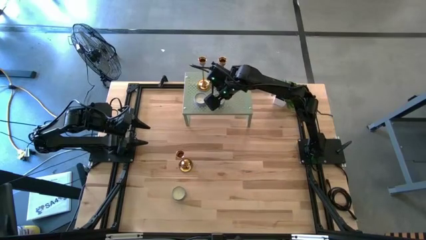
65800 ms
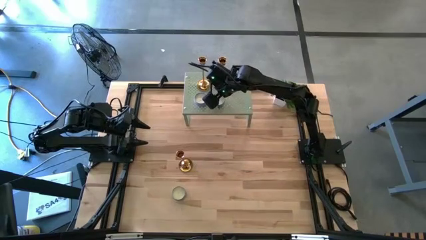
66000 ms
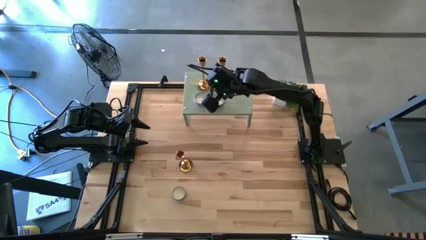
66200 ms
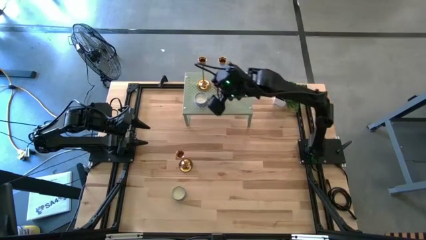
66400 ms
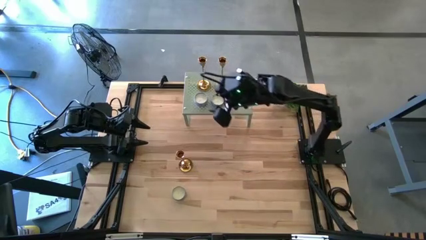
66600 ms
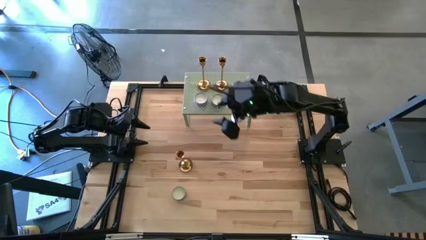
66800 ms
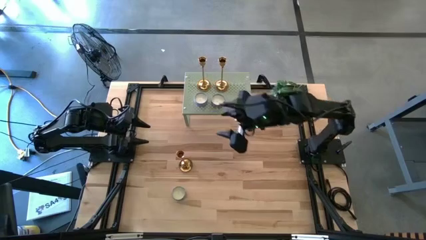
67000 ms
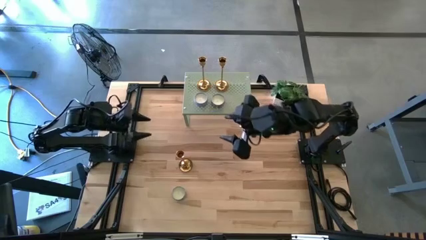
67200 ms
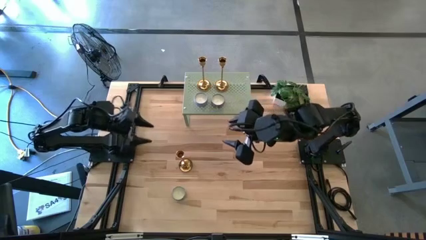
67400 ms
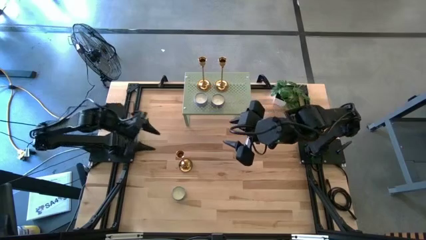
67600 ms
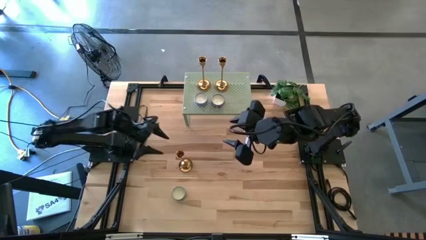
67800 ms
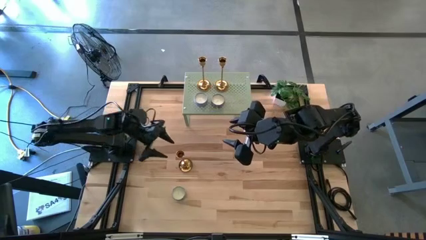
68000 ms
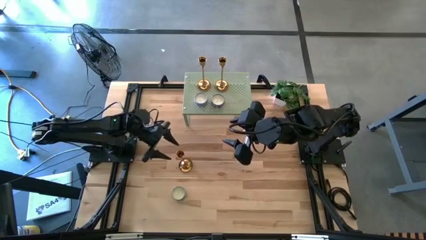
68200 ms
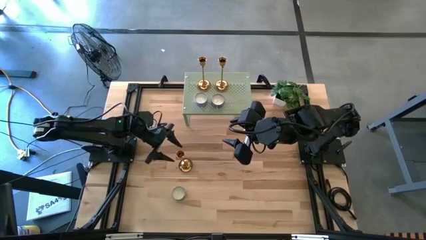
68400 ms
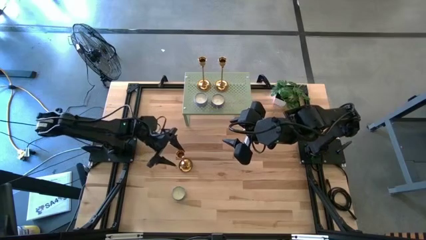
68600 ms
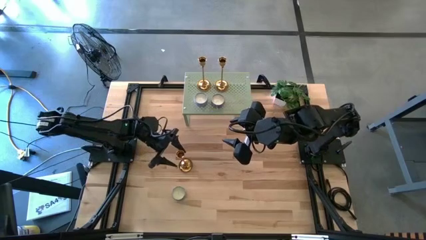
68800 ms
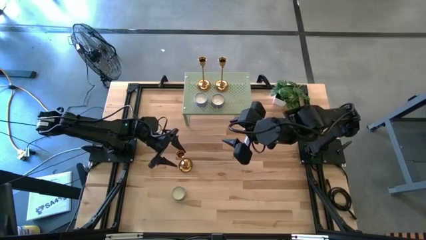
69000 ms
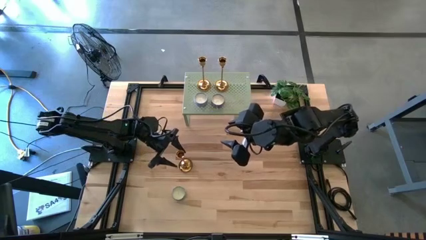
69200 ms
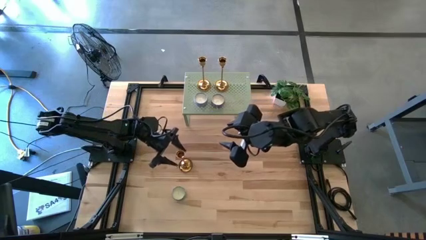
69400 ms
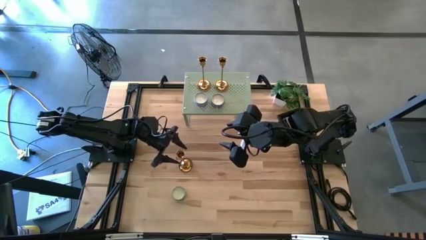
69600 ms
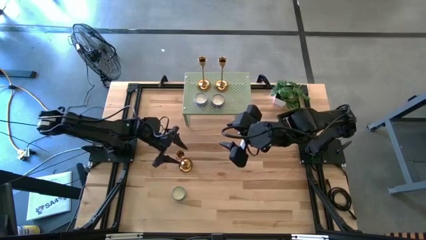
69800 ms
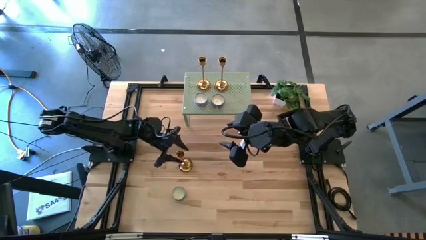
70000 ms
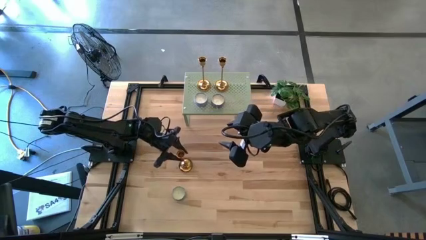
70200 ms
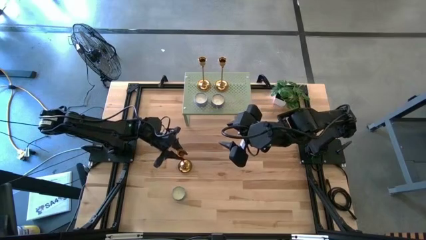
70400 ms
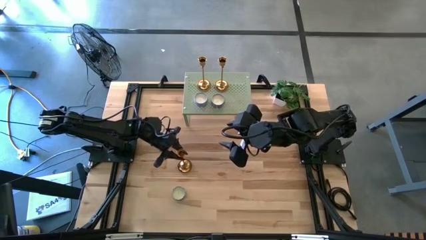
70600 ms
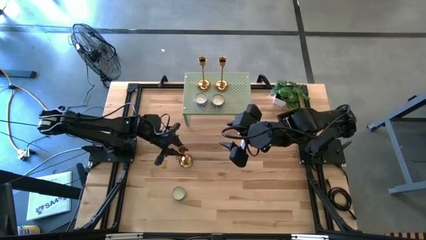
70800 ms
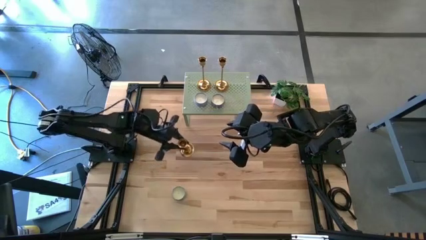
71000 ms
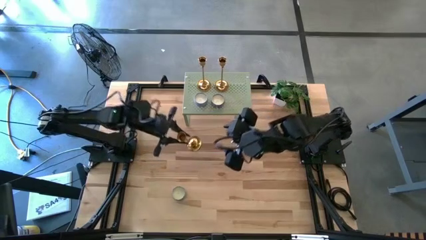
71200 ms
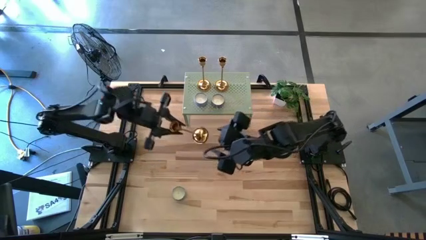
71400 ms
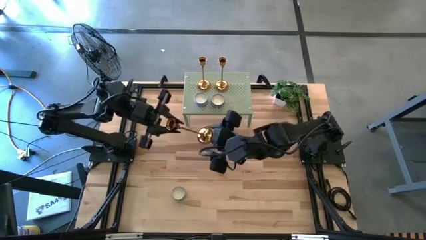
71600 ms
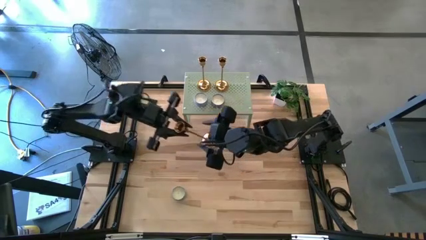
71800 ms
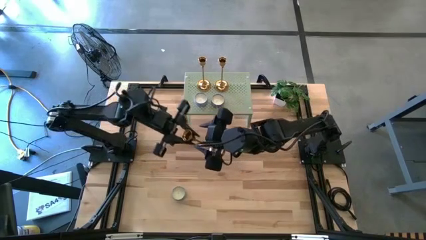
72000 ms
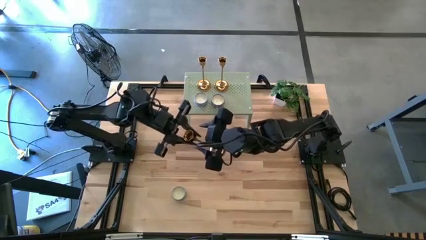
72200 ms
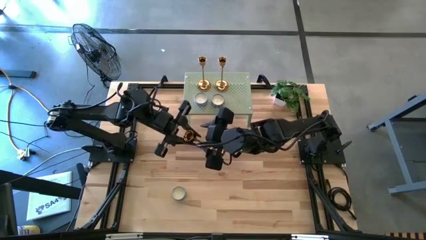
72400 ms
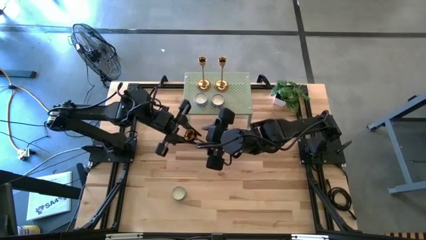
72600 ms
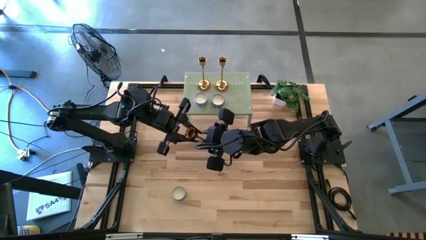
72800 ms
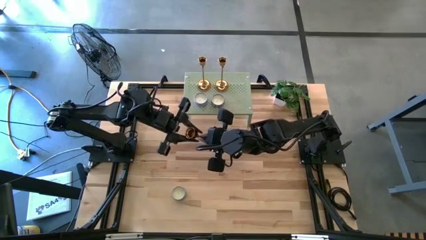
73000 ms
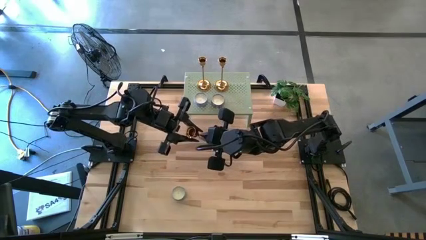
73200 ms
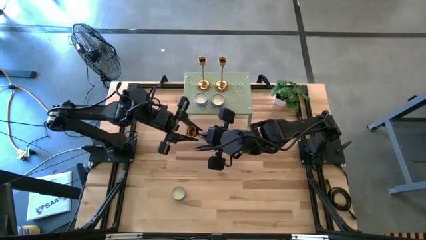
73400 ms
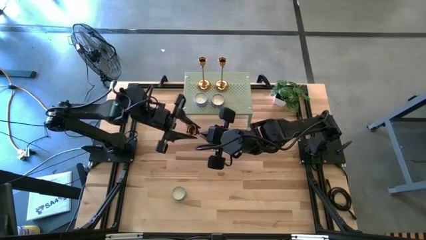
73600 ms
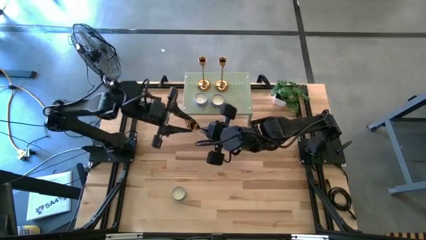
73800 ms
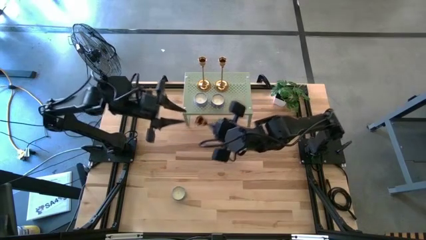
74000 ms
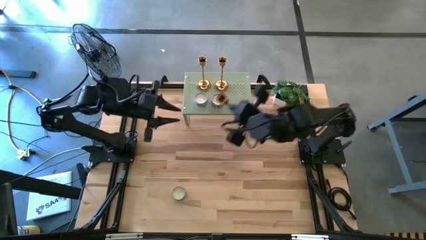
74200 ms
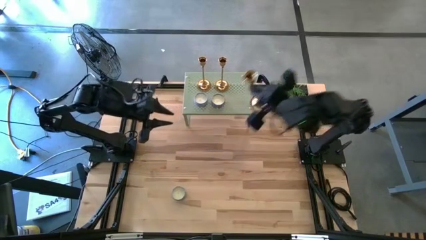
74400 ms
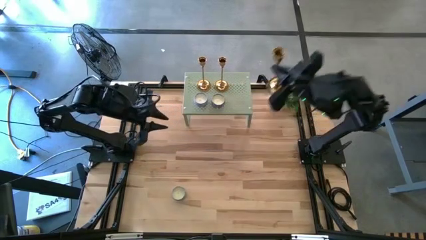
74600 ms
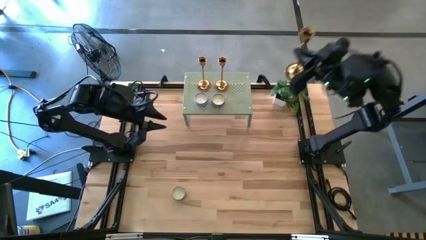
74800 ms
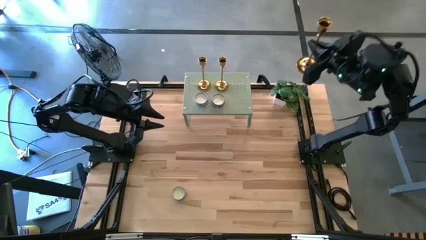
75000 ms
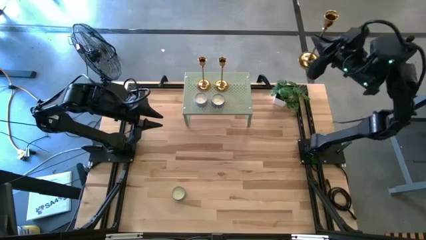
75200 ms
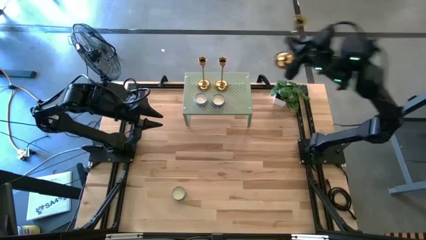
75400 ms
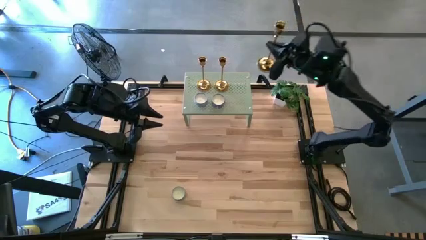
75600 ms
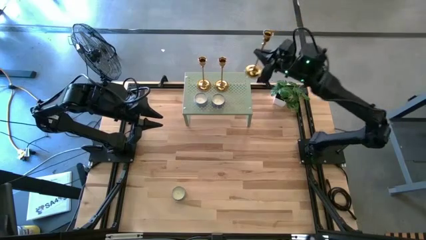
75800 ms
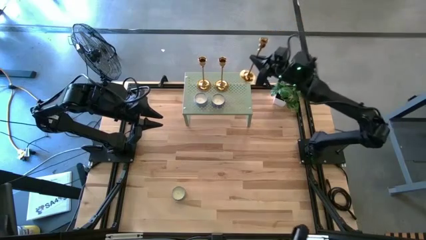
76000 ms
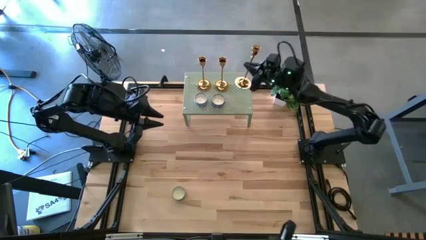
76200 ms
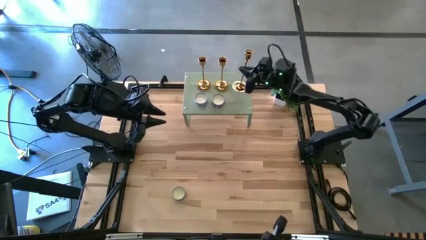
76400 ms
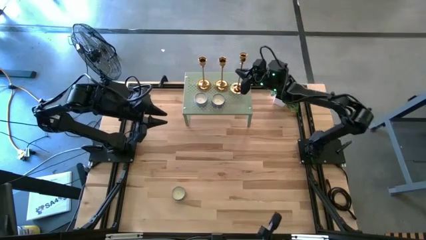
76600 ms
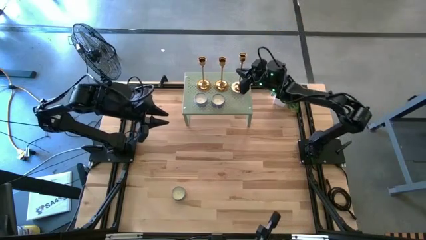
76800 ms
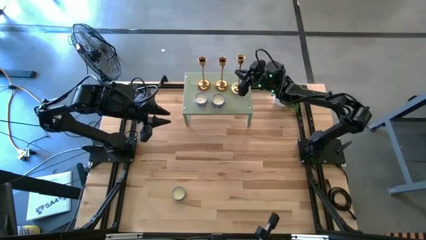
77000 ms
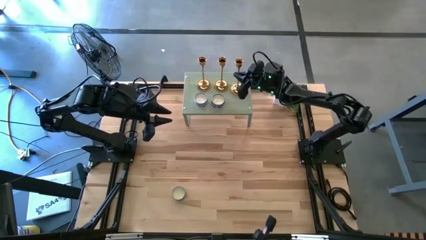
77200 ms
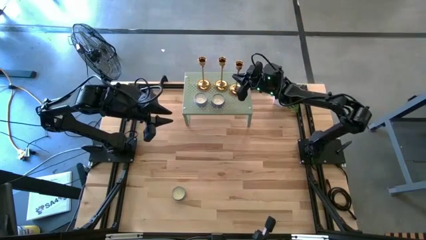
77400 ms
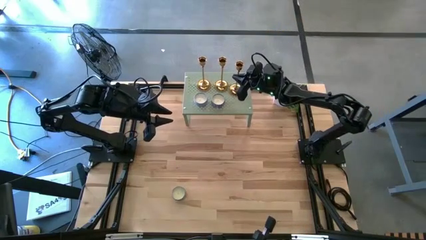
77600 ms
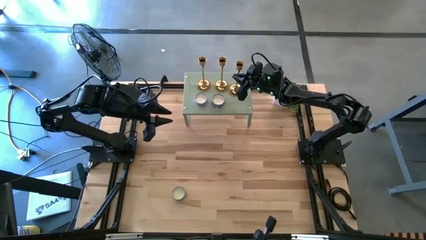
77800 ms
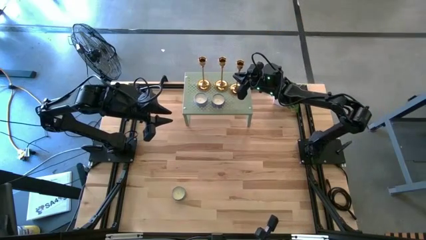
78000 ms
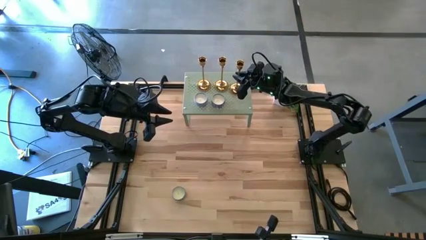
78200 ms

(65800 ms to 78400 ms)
Task: Pick & Place candle stick holders
Put the gold candle holder on the shelf
